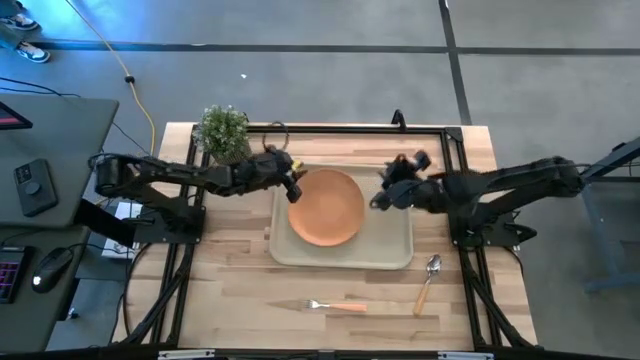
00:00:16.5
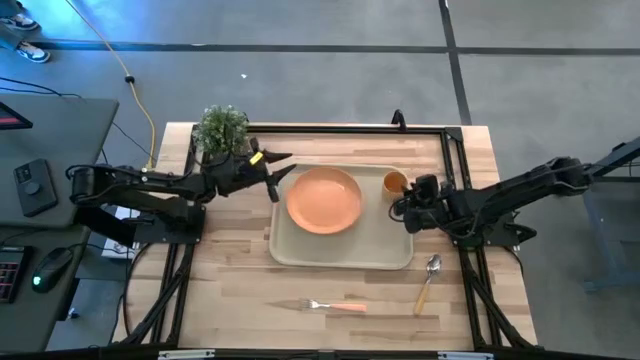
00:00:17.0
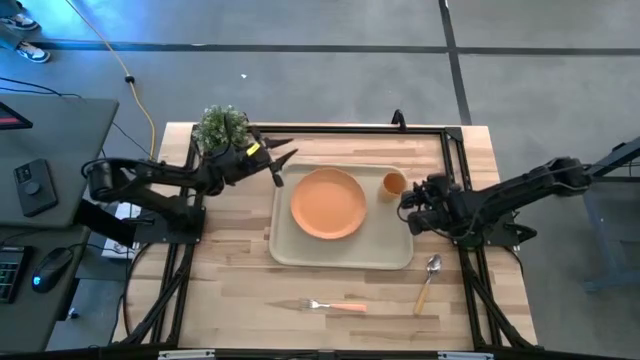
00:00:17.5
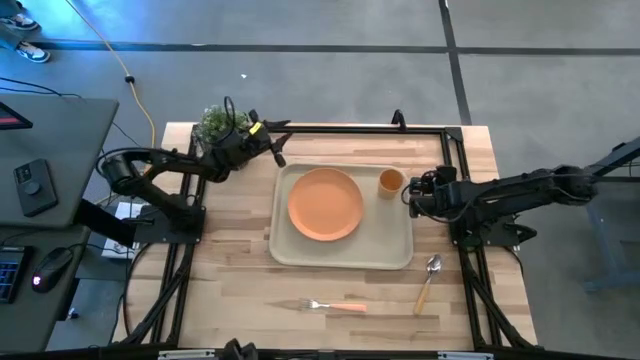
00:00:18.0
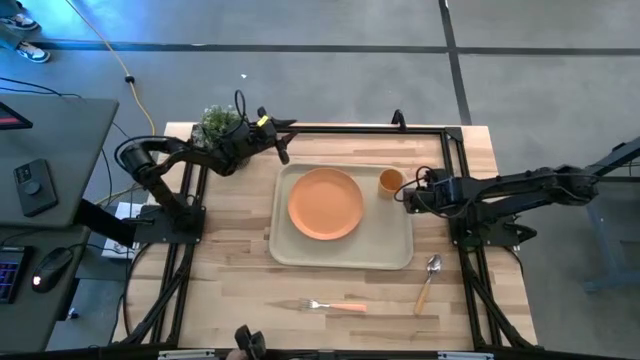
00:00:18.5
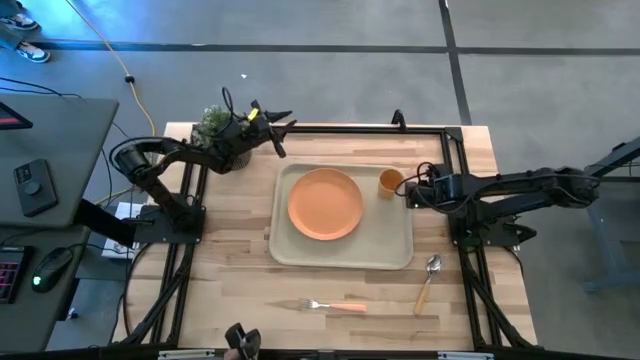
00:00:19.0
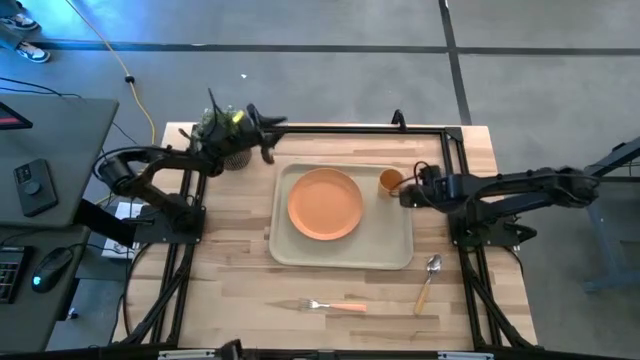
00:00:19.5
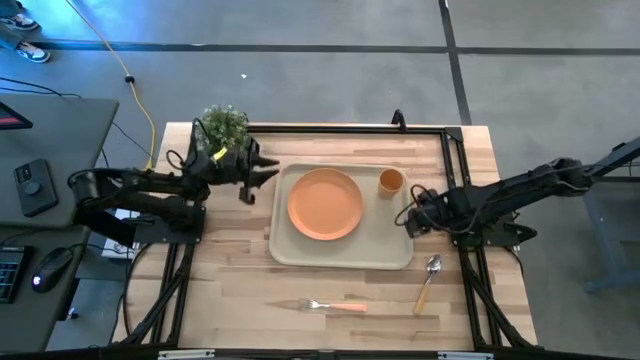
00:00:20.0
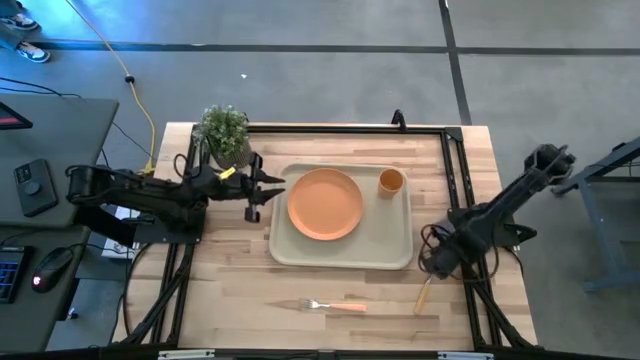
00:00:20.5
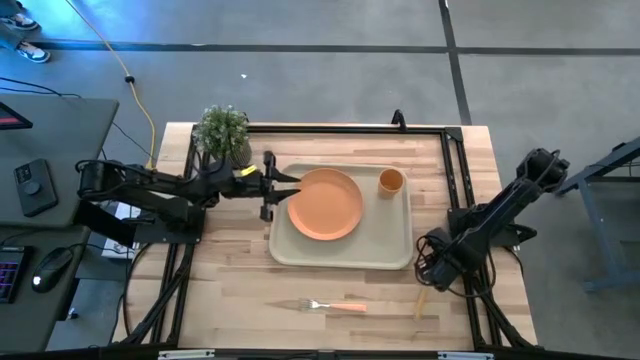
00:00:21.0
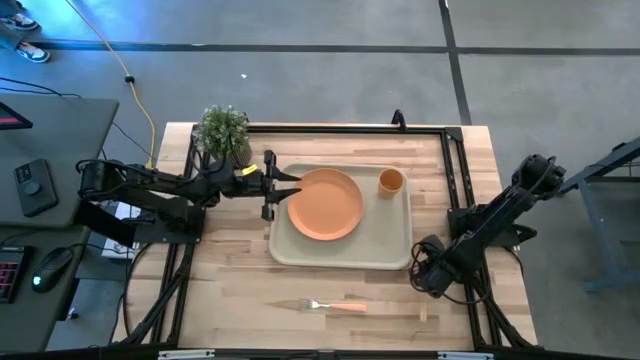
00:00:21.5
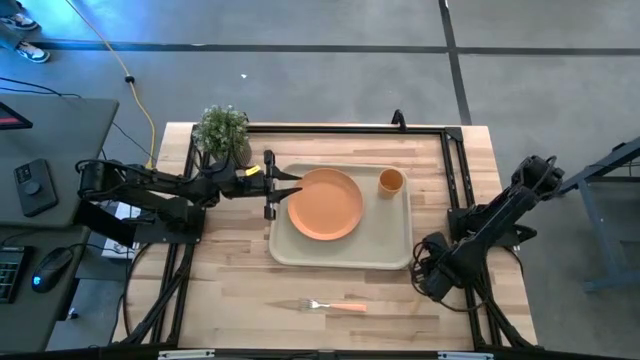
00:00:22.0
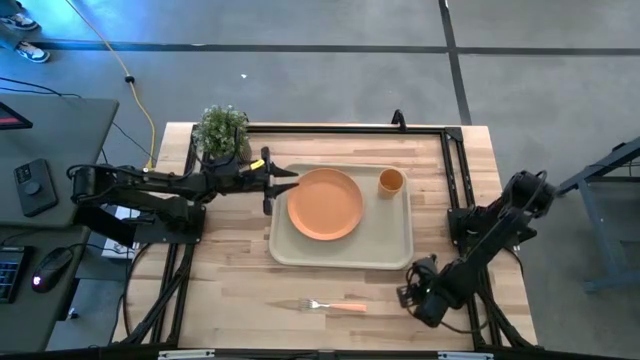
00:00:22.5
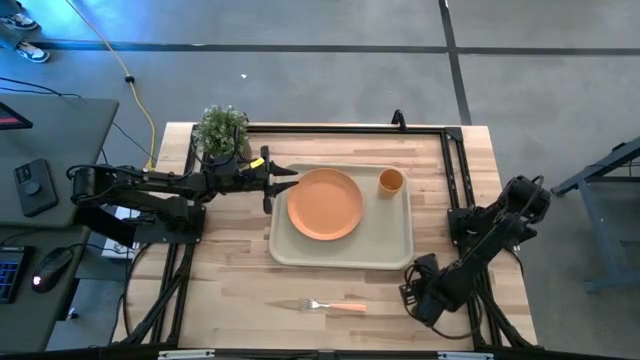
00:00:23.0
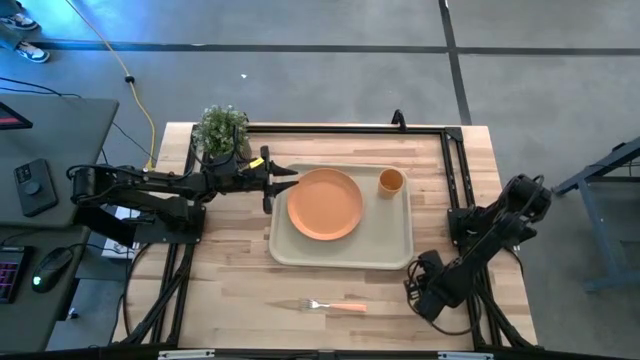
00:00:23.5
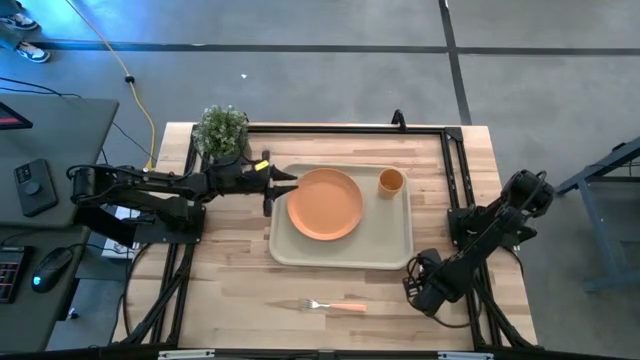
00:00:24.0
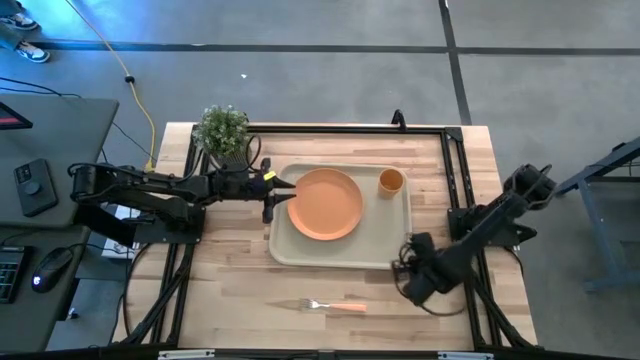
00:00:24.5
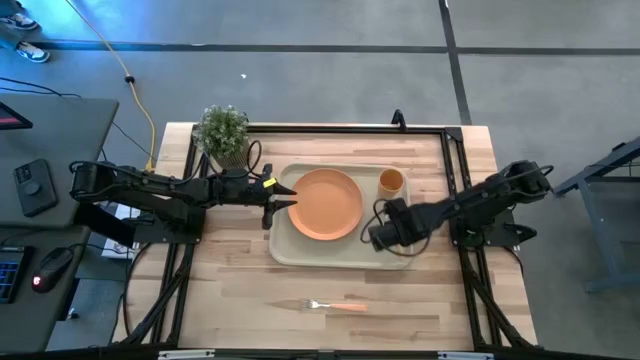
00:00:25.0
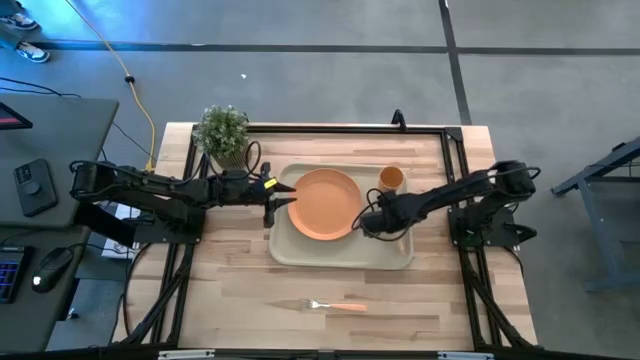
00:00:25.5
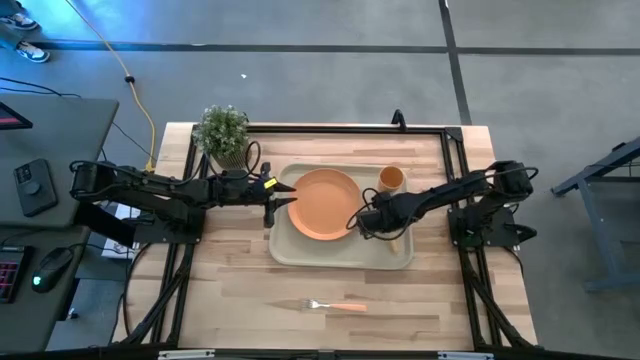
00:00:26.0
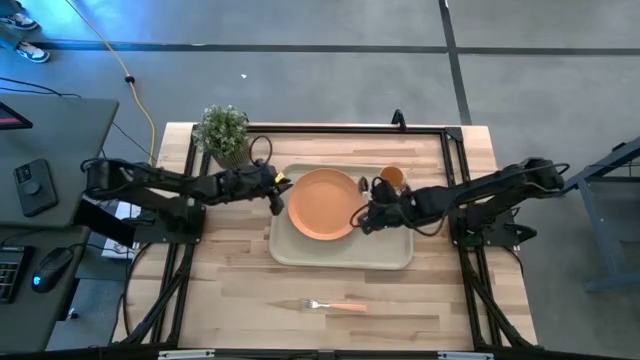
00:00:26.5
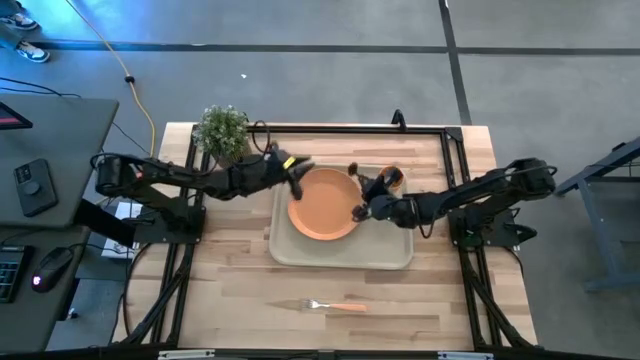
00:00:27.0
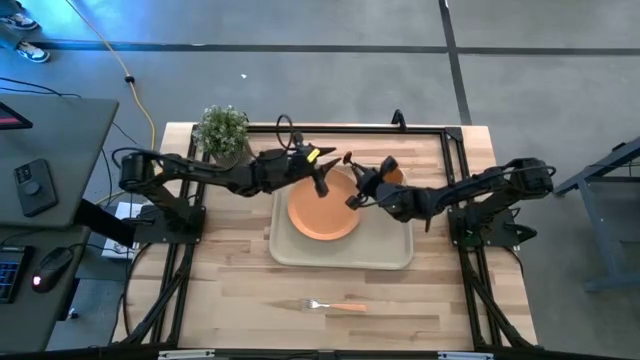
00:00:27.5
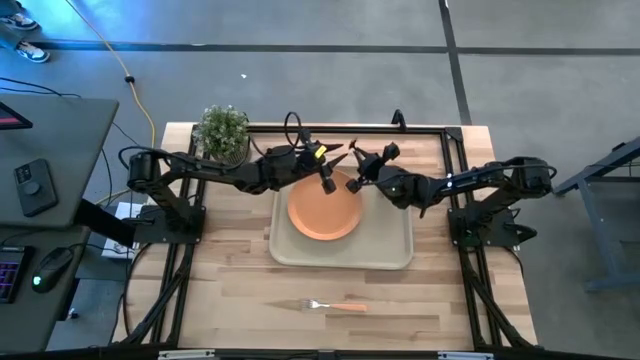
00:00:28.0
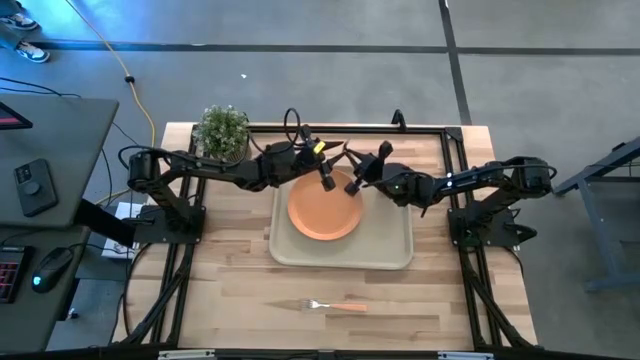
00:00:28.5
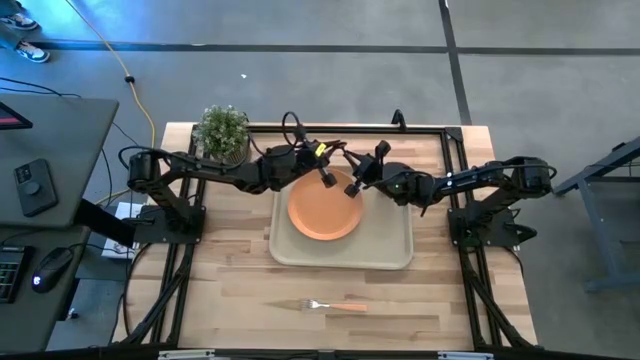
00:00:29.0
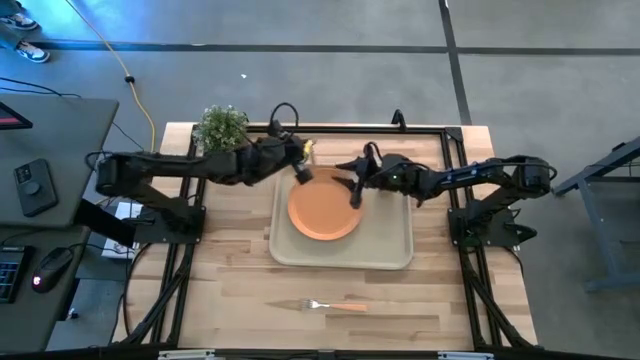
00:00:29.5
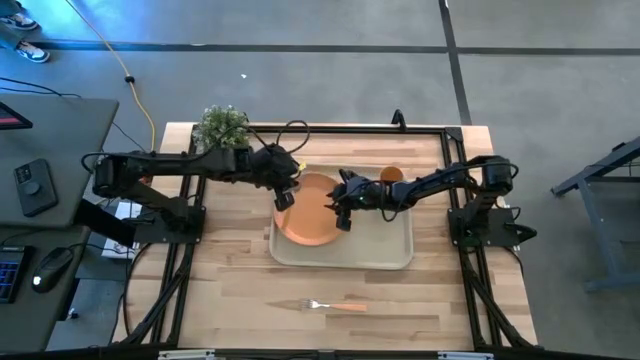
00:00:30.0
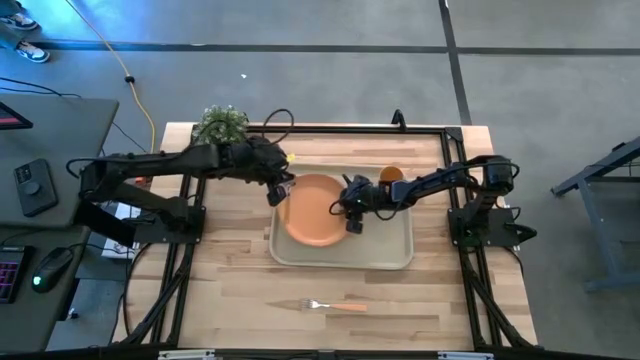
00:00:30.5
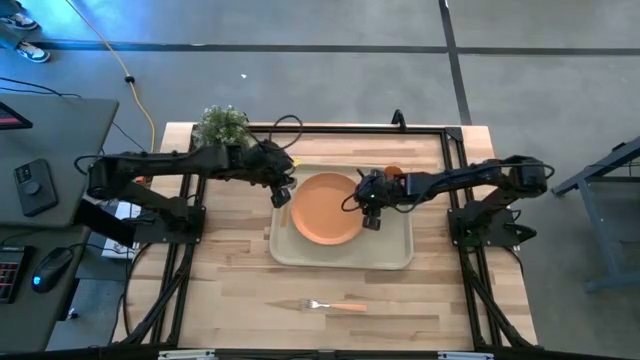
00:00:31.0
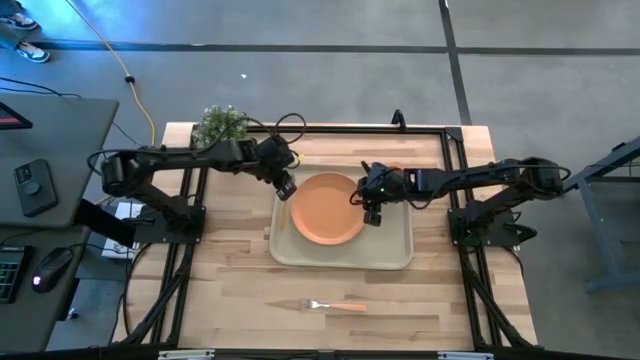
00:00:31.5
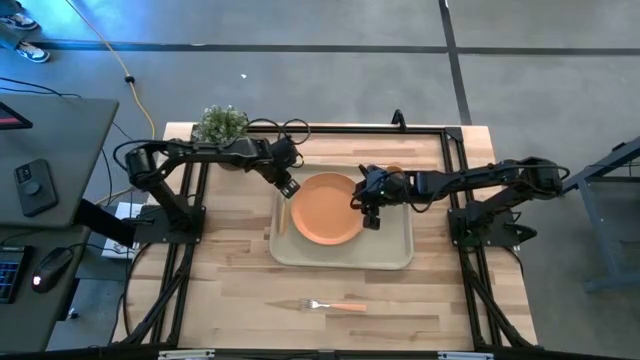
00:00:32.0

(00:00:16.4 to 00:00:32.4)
Task: Pick and place plate/cup/fork/spoon on tray
Put the orange spoon to the left of the orange plate on the tray

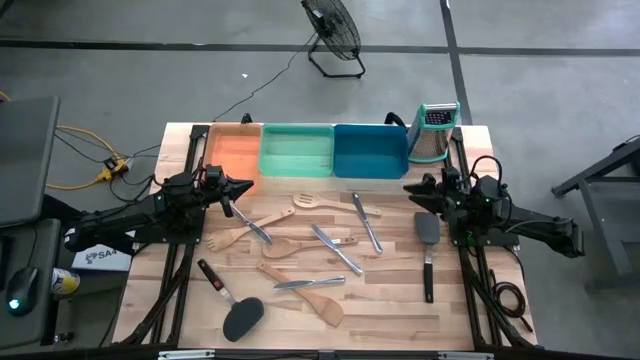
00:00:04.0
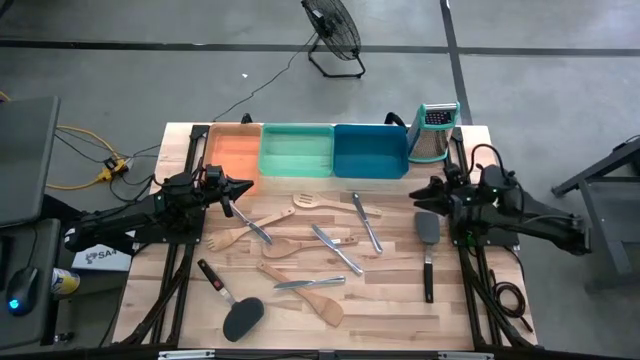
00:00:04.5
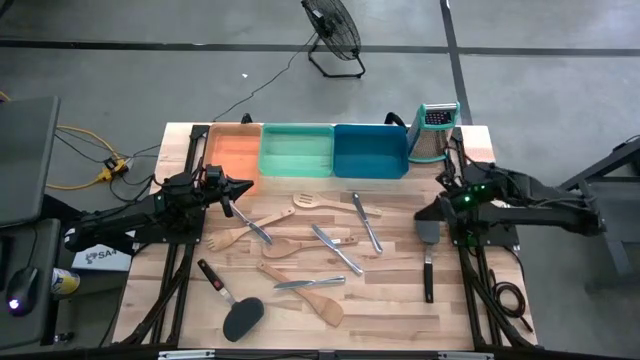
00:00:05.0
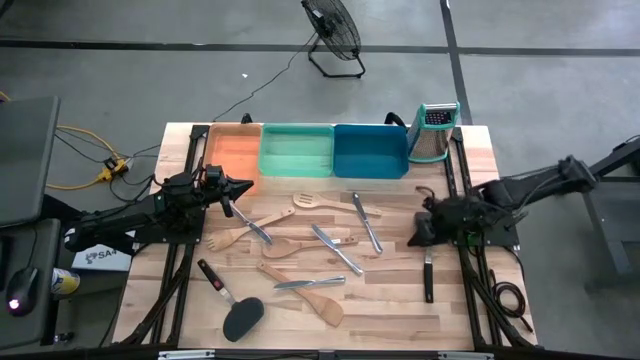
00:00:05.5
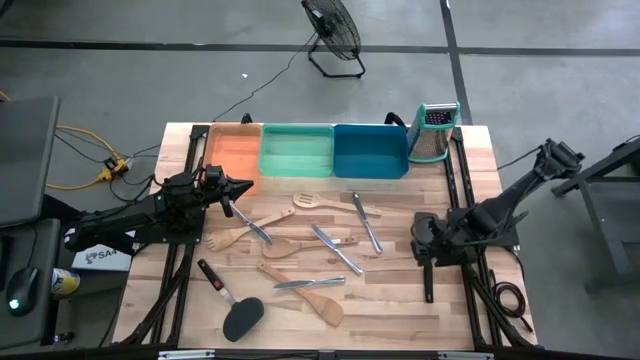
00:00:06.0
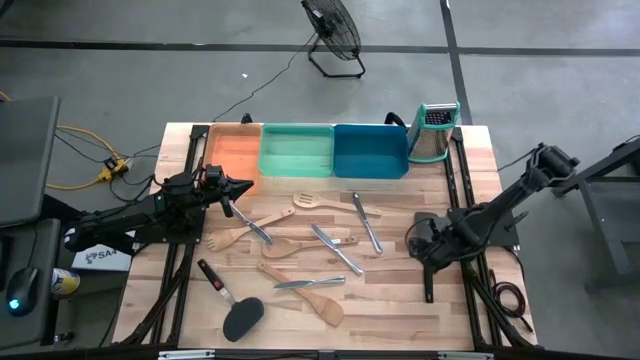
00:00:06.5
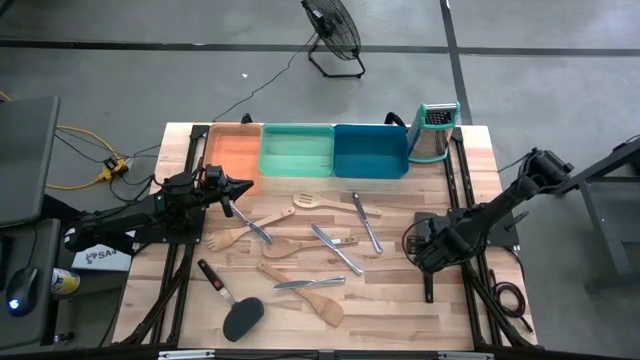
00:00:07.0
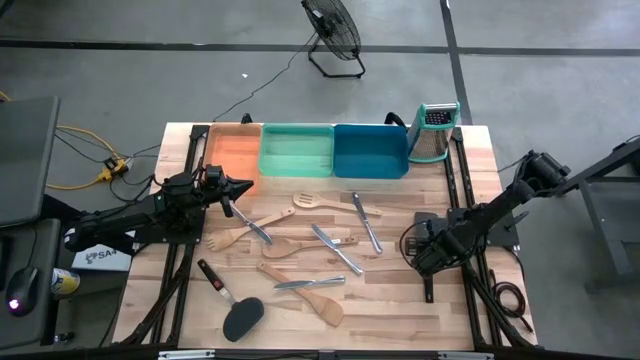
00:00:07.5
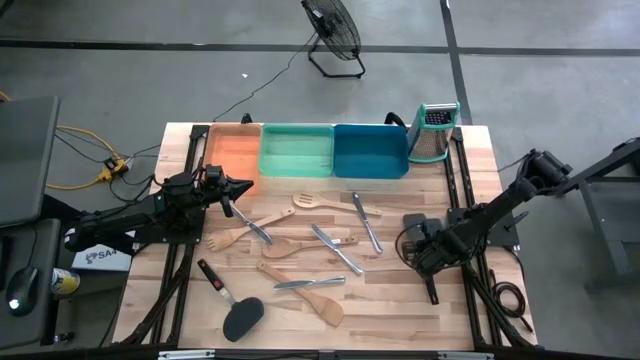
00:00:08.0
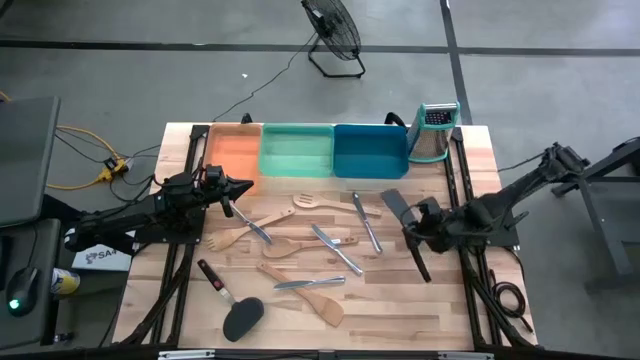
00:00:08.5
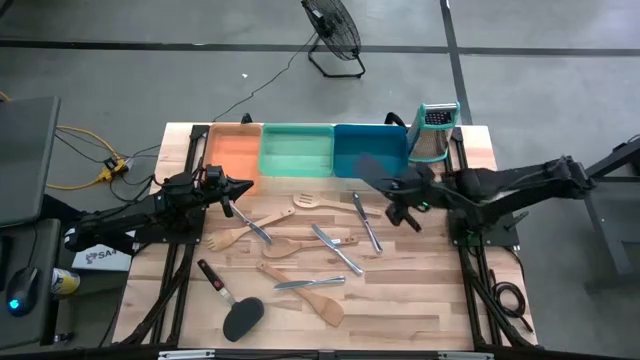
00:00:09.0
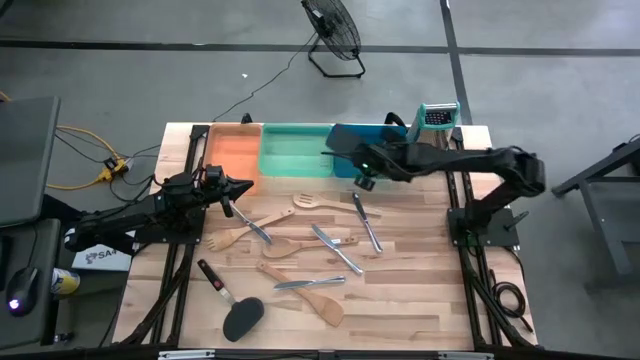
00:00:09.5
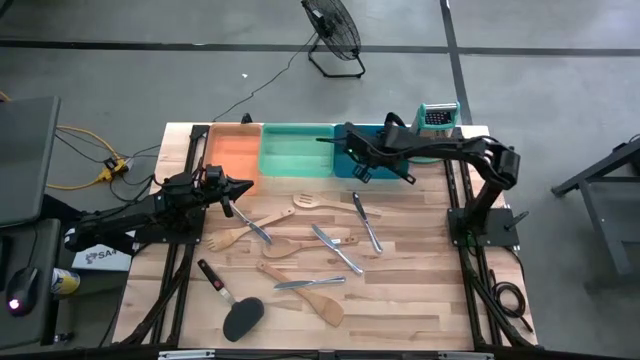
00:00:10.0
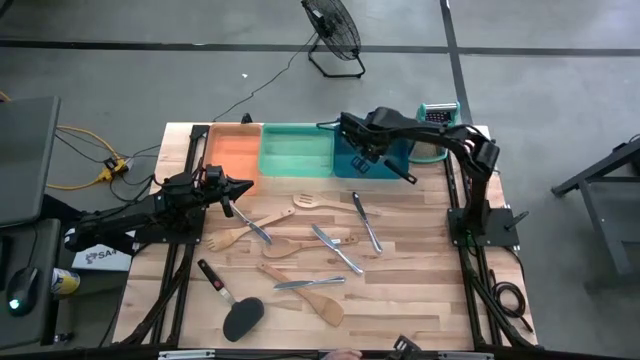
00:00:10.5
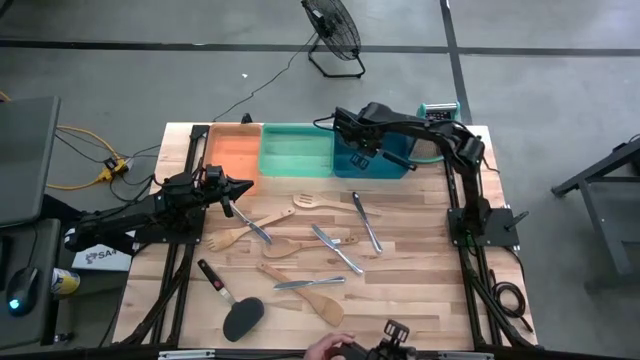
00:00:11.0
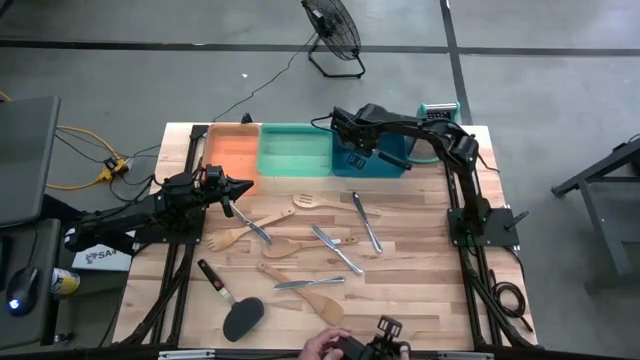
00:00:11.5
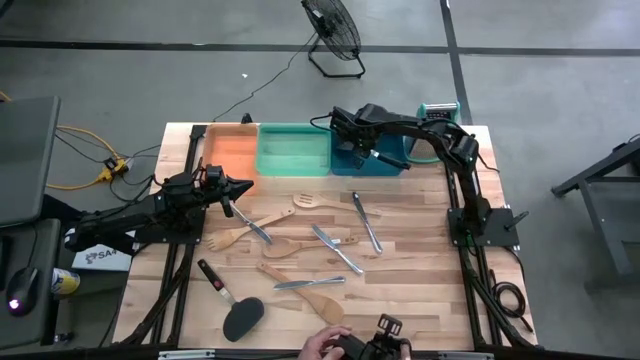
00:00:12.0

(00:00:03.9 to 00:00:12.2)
Task: Pick & Place Kitchen Items
Put the black spatula into the blue bin
